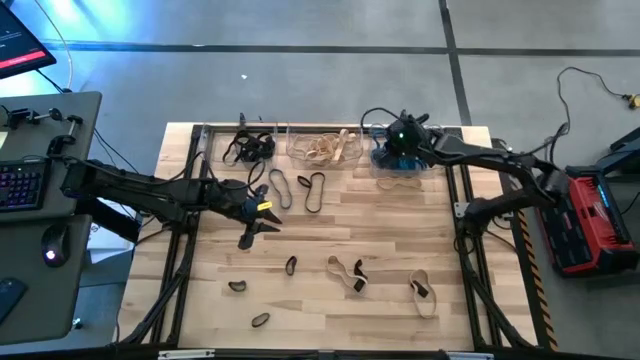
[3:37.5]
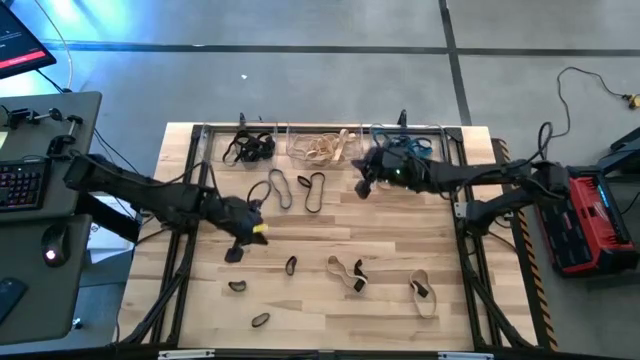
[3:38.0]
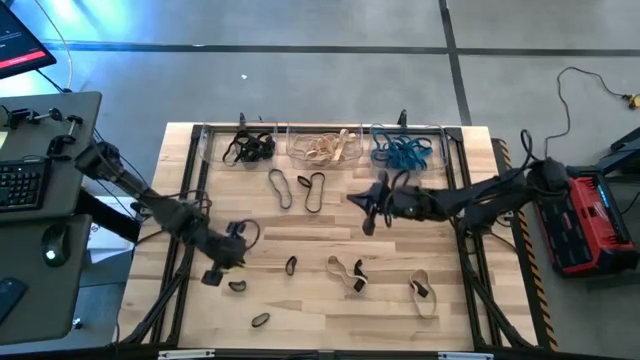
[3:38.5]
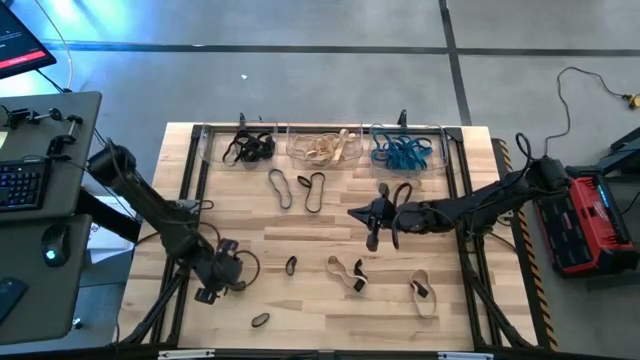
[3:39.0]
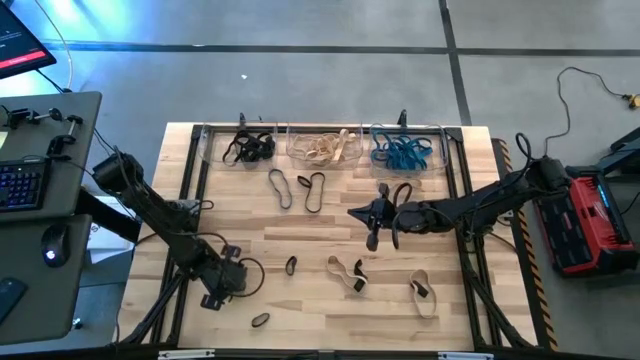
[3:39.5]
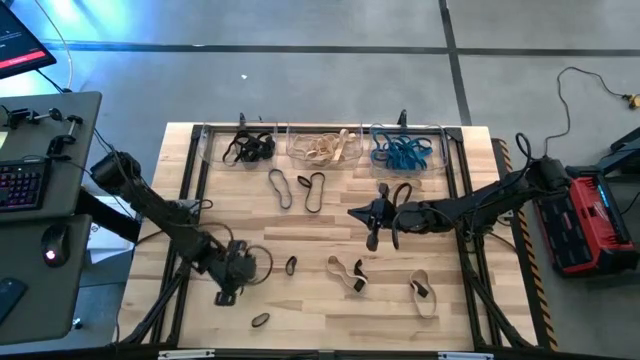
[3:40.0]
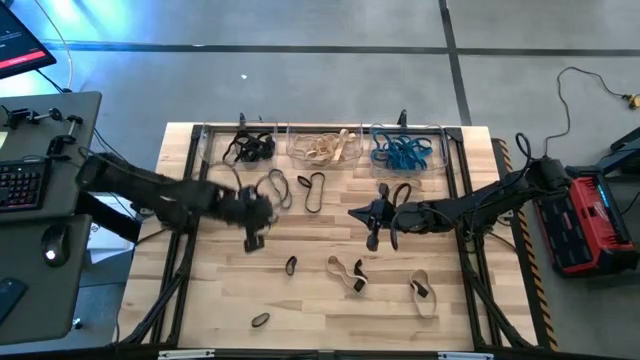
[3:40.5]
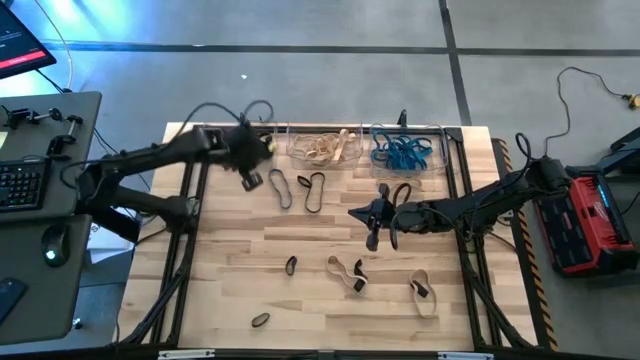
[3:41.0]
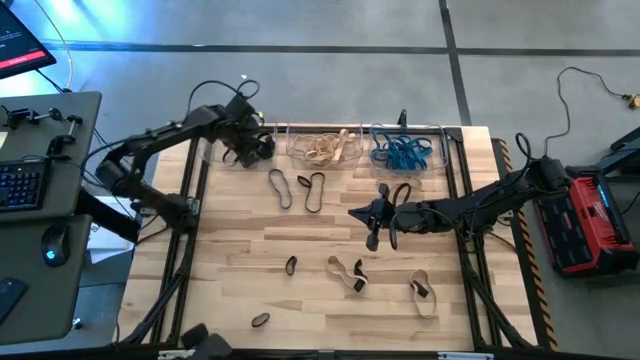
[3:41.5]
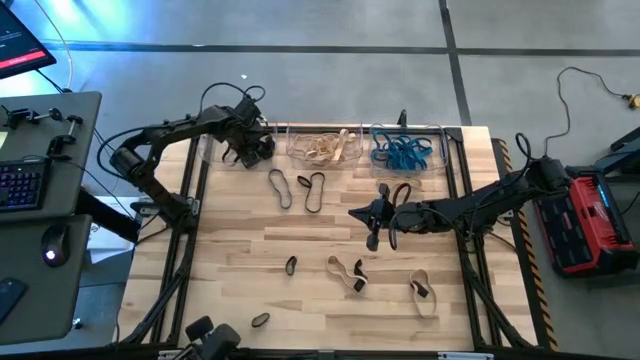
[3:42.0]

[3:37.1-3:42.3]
Task: Sort rubber bands into baskets
Put the black rubber band into the left transparent bin

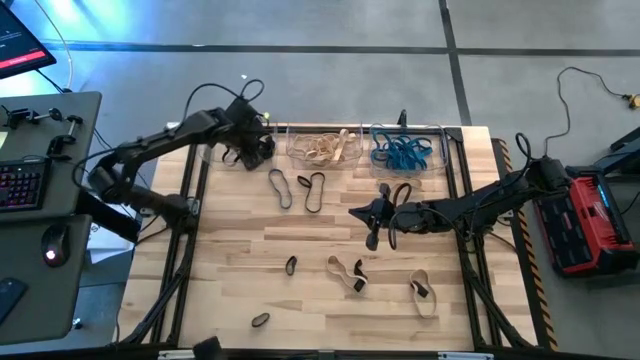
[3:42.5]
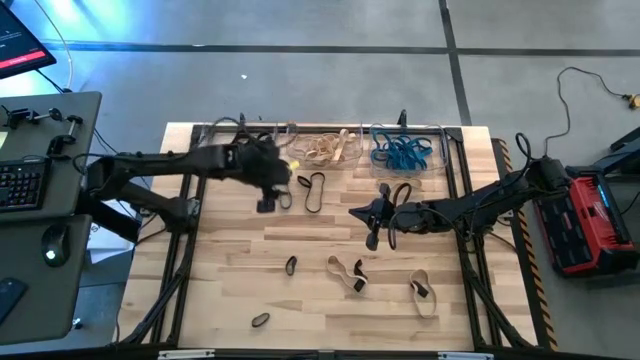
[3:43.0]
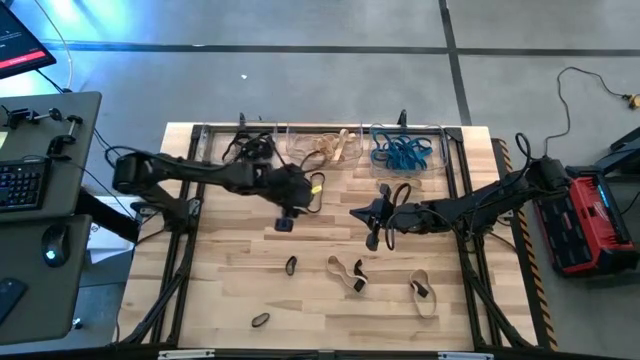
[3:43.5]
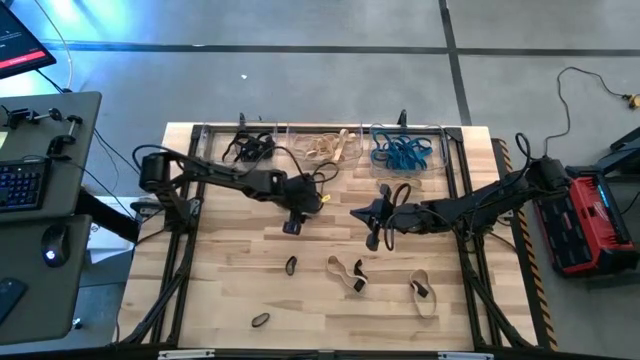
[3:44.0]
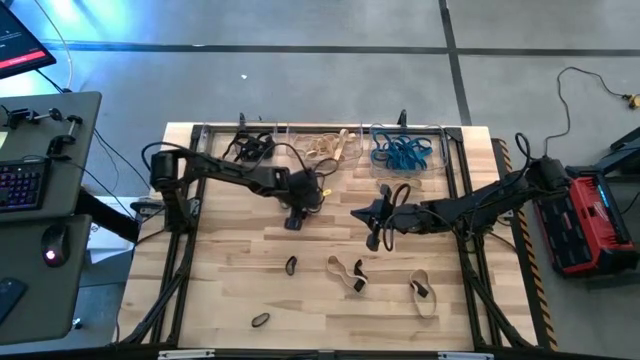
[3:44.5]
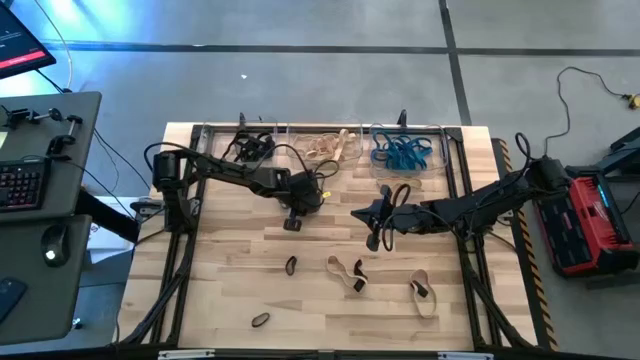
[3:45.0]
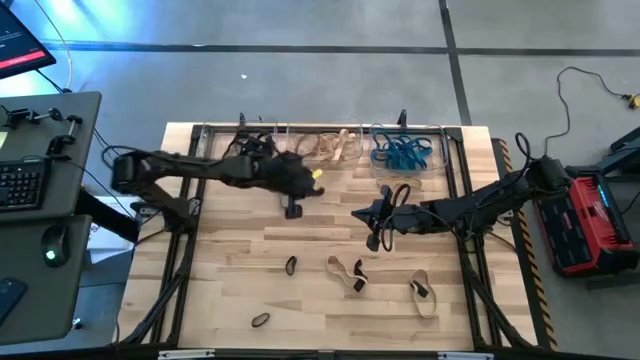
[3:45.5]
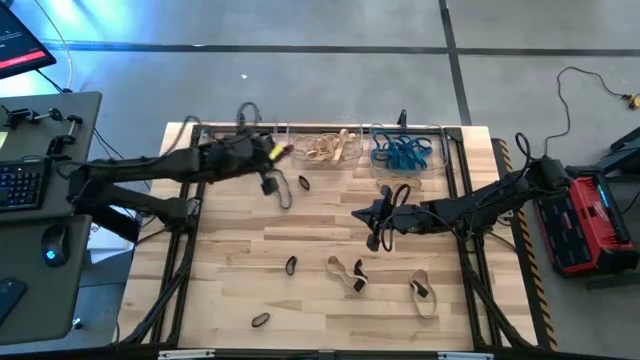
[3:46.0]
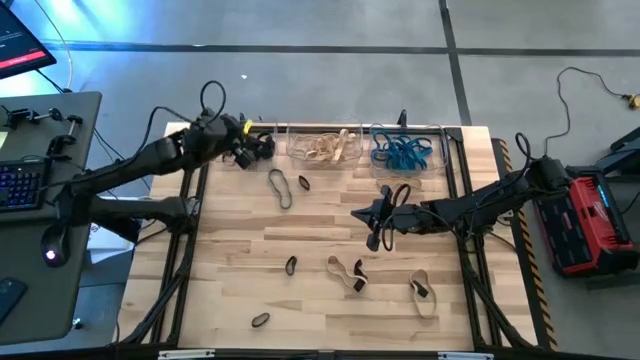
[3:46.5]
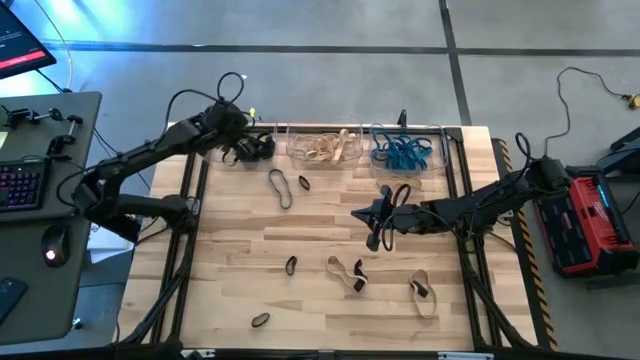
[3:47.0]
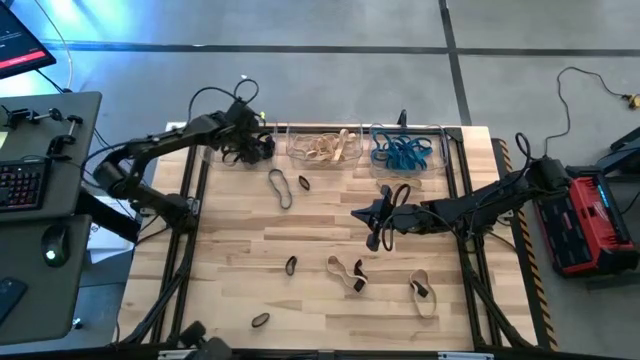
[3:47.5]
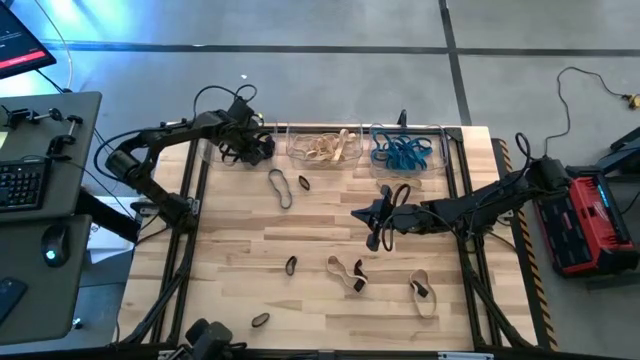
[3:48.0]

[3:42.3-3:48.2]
Put the black rubber band into the left transparent bin

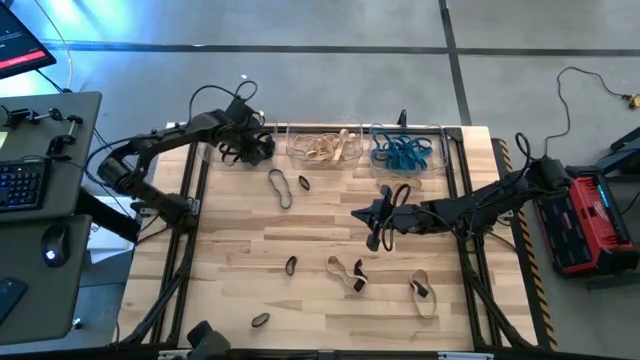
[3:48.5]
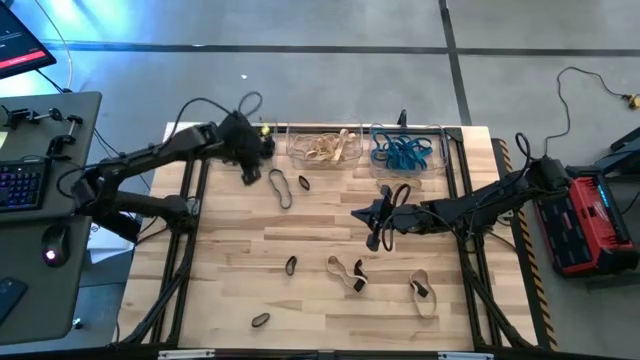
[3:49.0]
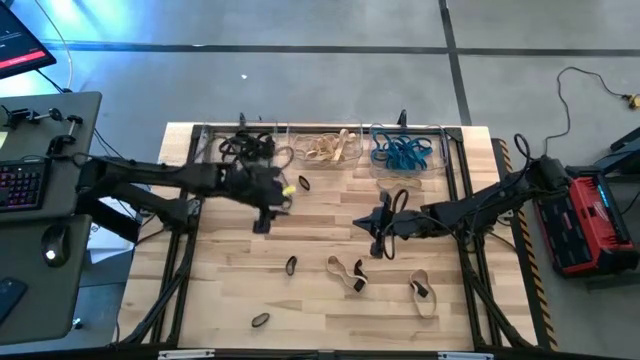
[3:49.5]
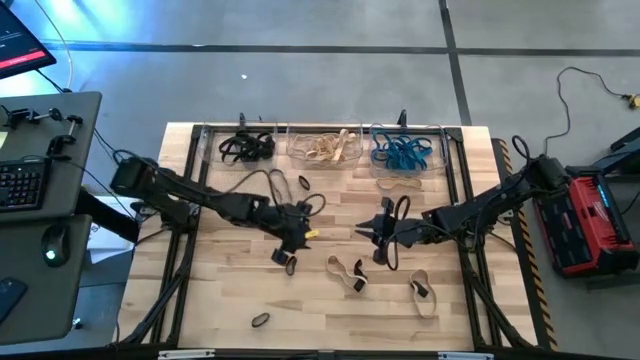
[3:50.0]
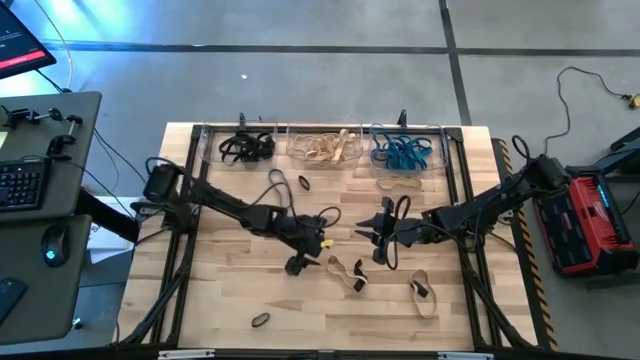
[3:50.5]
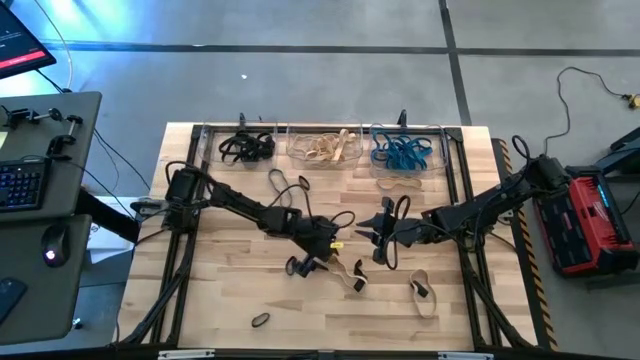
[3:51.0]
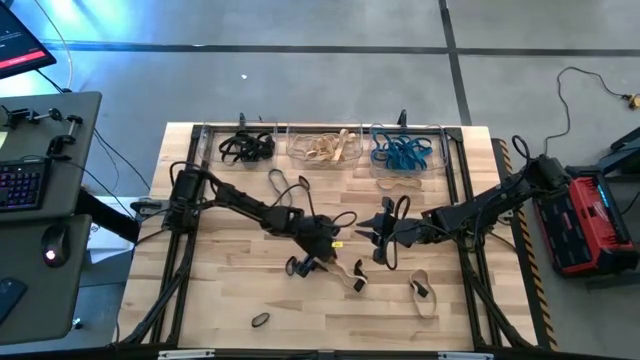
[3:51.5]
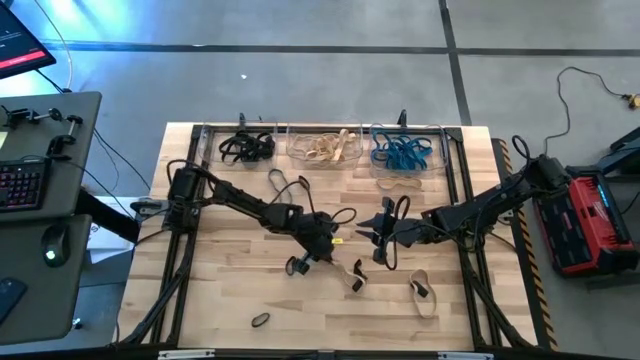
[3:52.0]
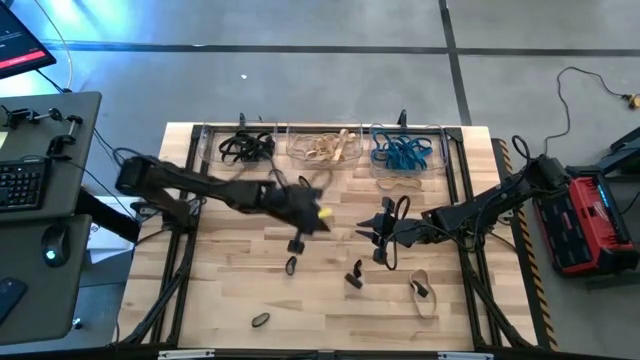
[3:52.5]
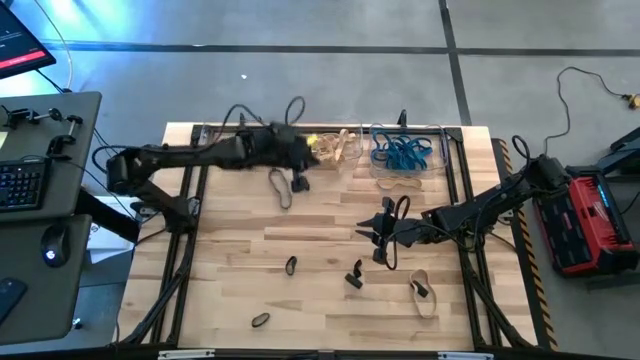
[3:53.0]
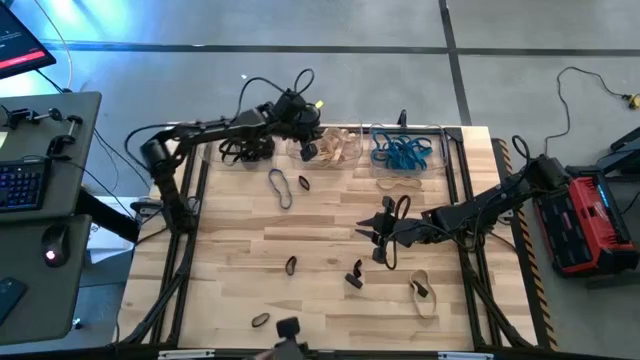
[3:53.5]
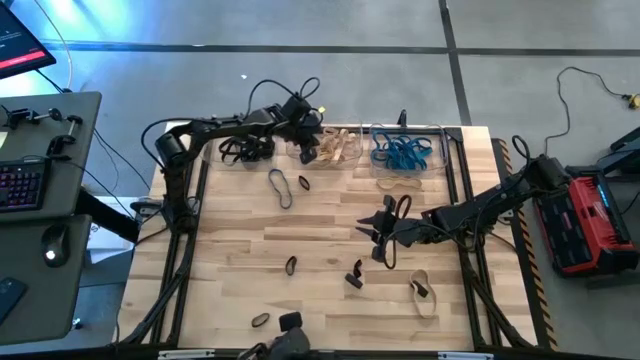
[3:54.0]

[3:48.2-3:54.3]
Put the brown rubber band into the middle transparent bin

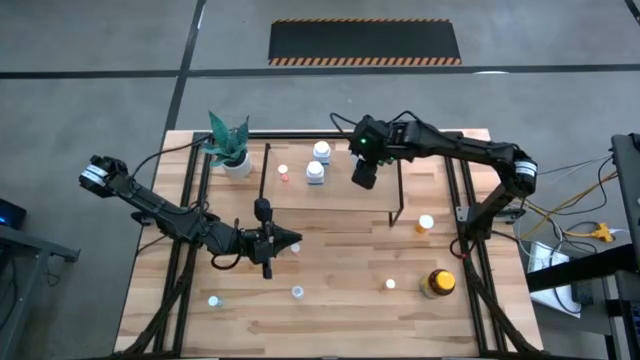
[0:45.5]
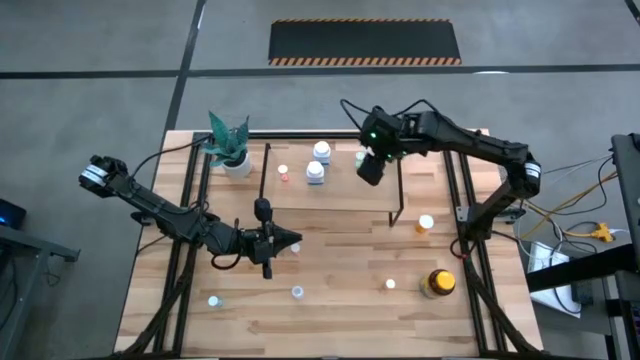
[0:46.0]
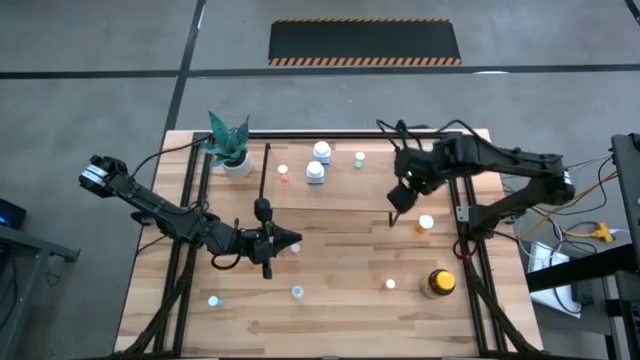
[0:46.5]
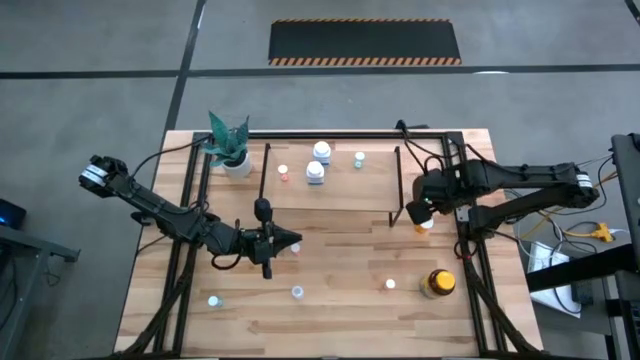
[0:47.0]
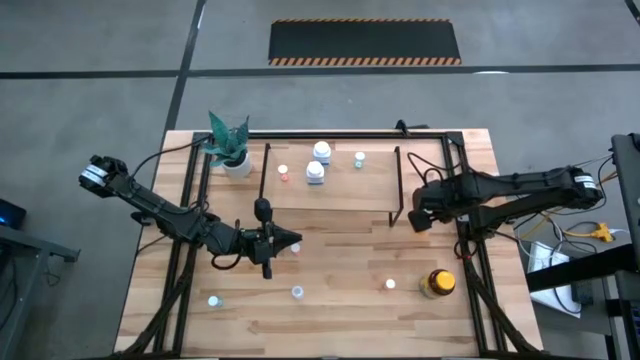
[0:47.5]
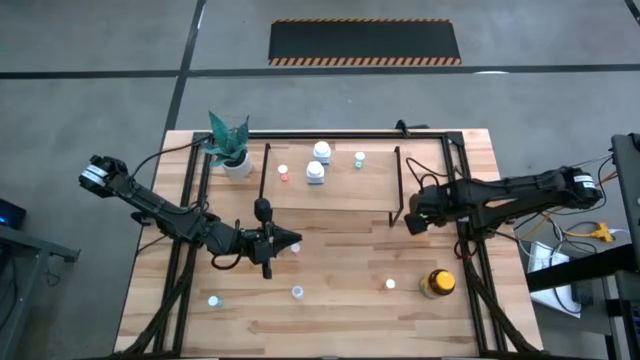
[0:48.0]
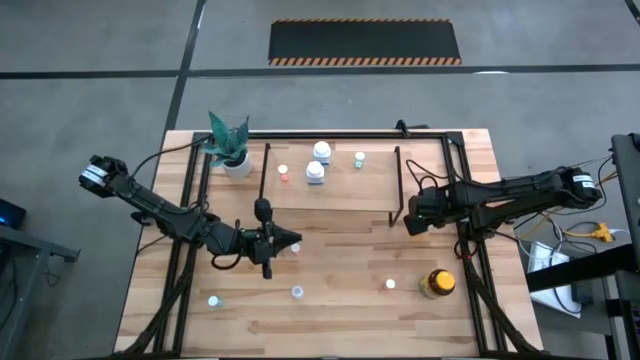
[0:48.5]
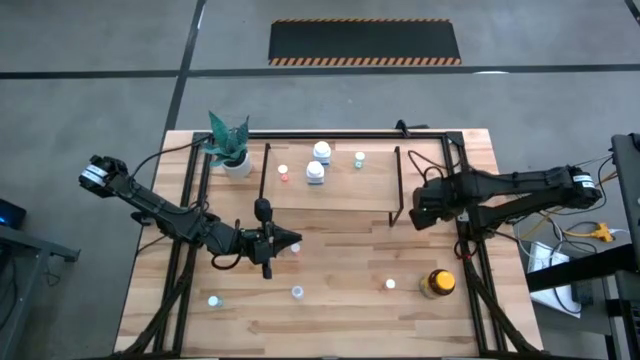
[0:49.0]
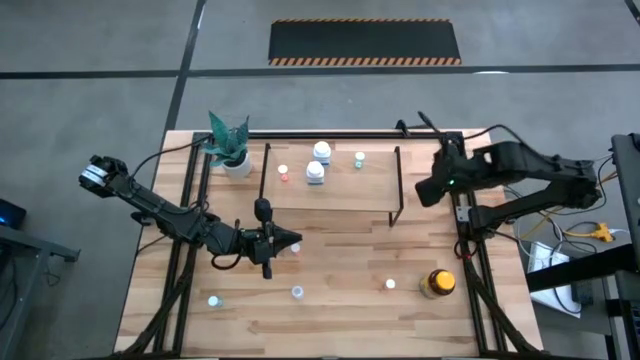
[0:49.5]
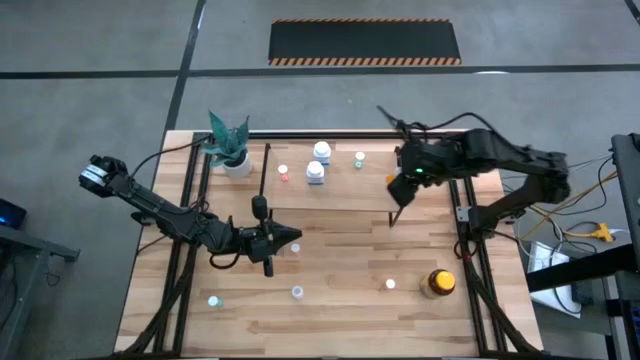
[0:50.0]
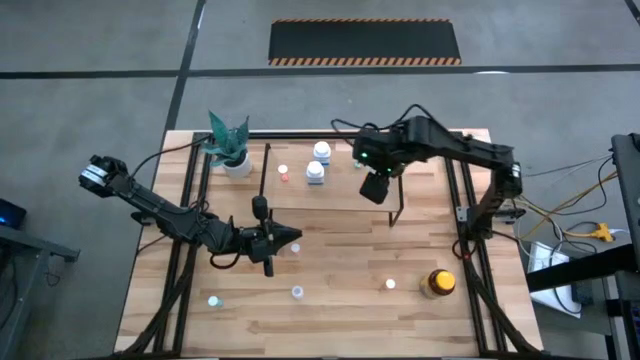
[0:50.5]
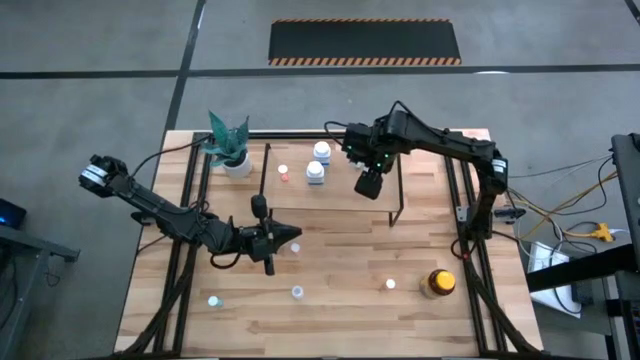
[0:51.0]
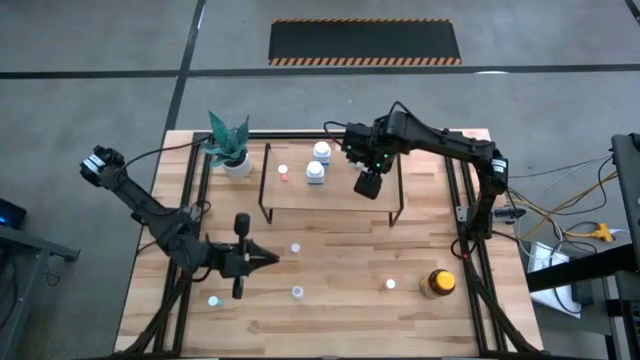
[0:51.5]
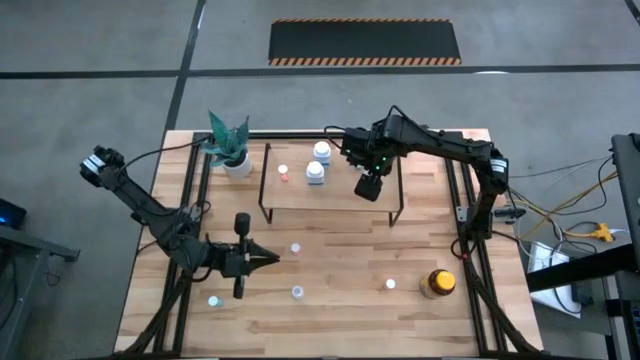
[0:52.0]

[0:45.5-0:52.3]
Task: Pick and place medicine bottles onto shelf by color
Put the orange pill bottle on the shelf
